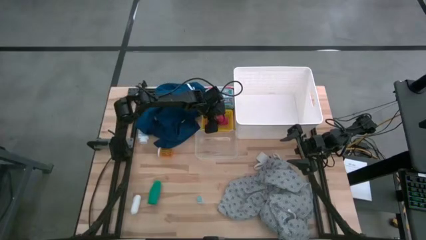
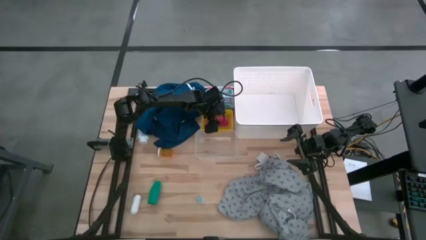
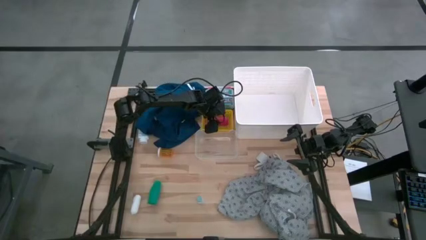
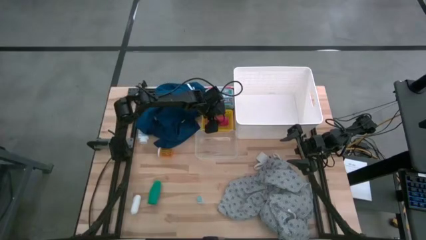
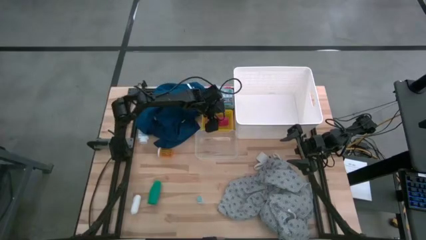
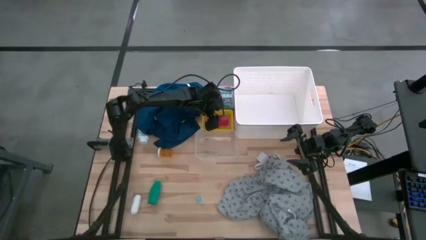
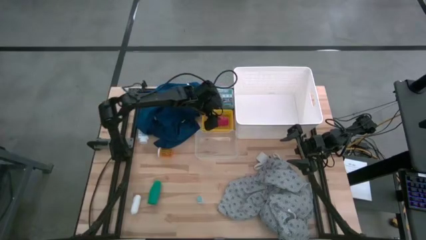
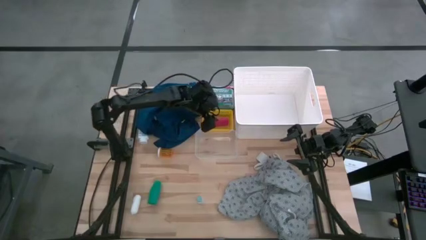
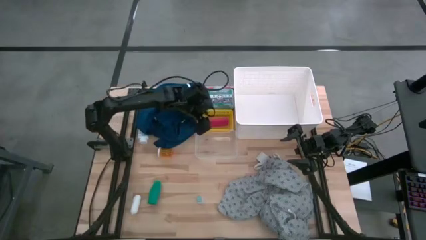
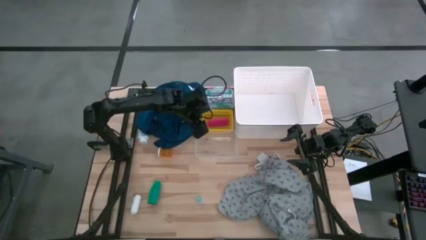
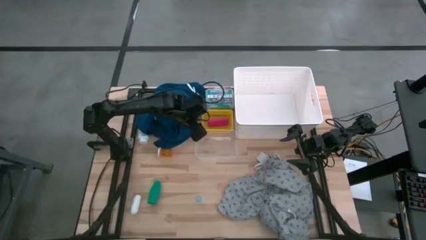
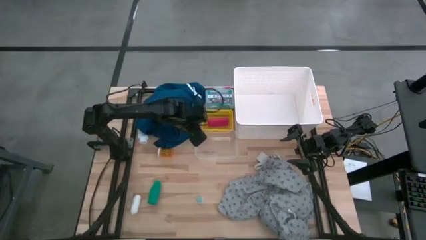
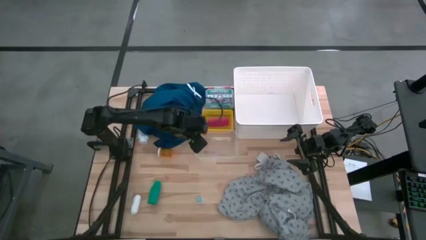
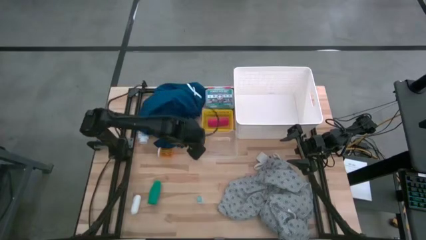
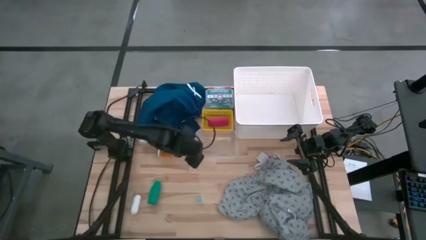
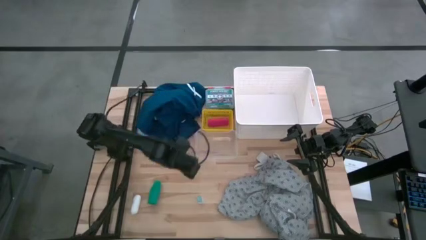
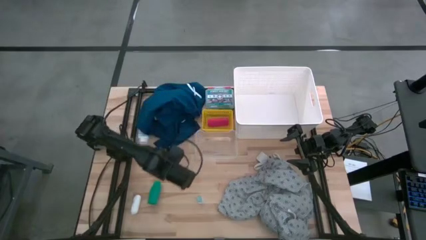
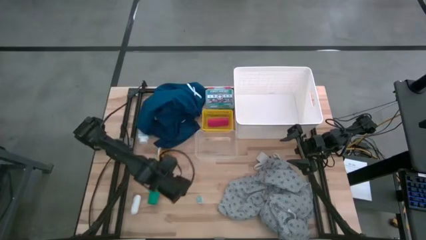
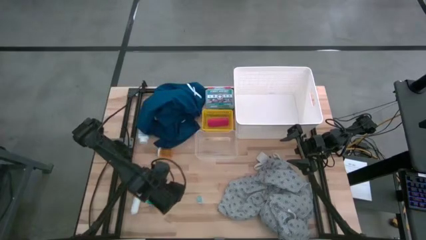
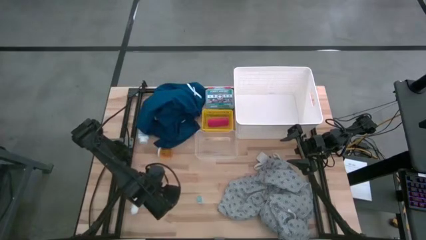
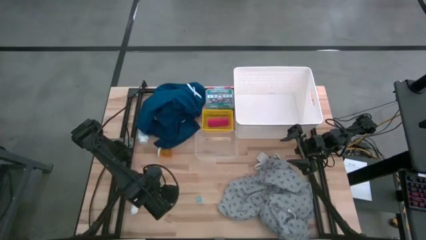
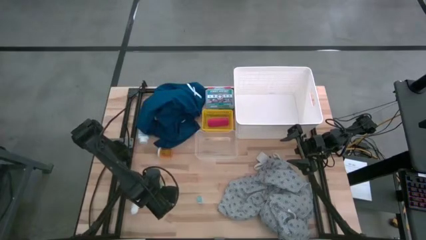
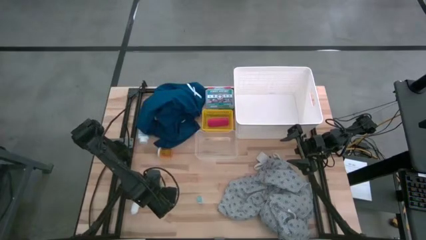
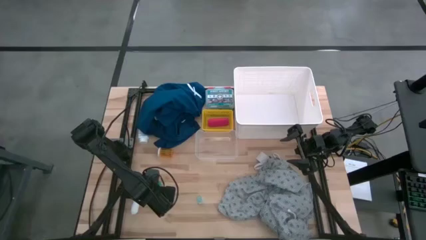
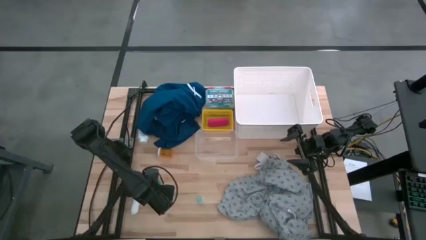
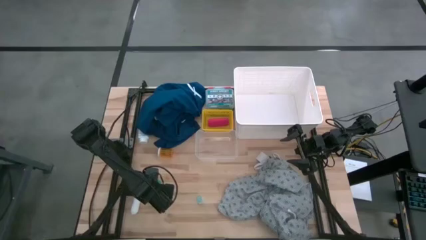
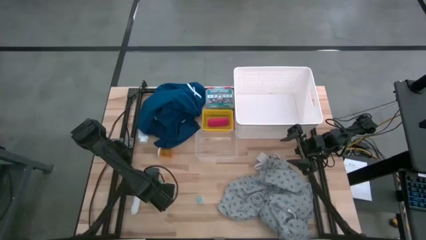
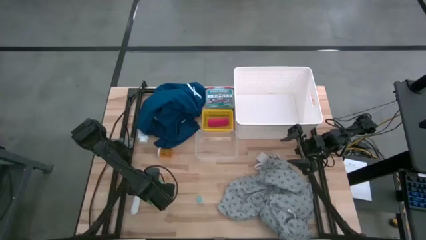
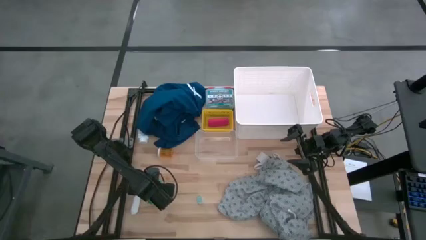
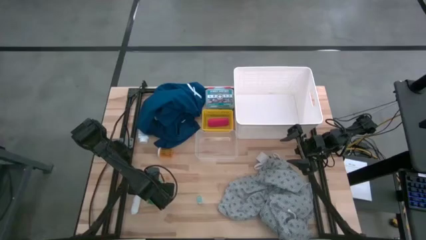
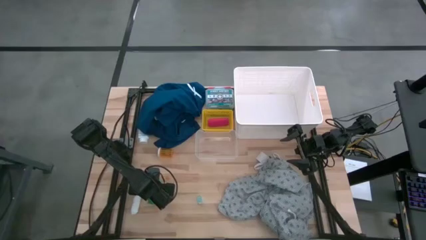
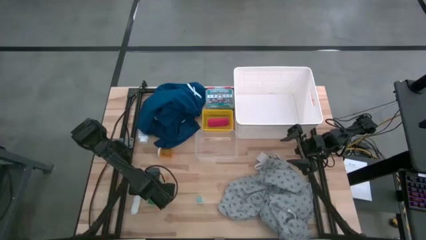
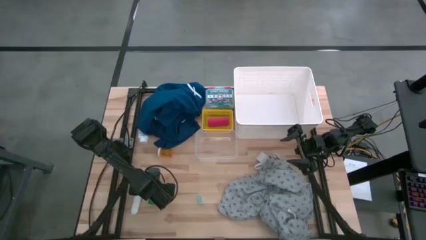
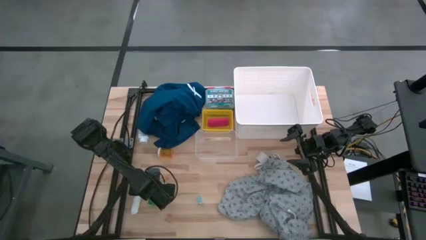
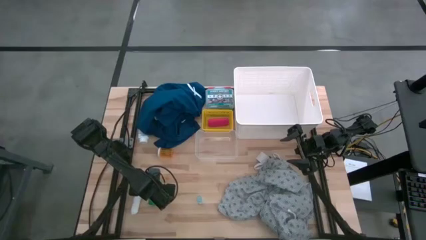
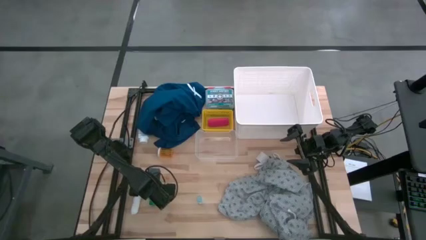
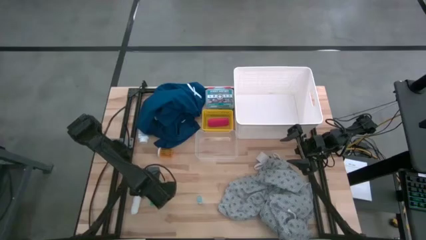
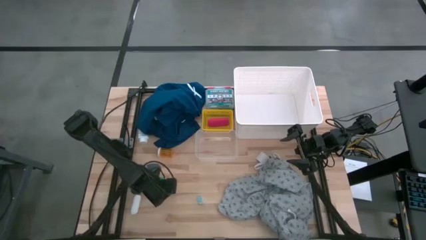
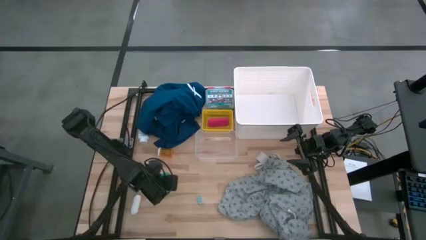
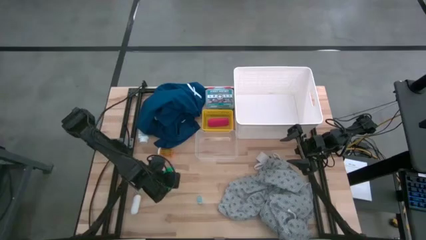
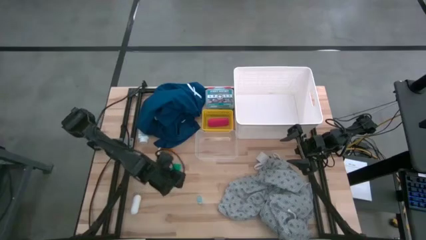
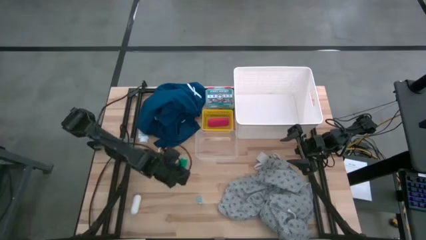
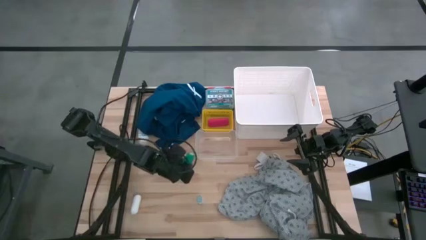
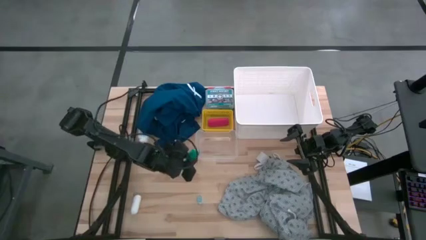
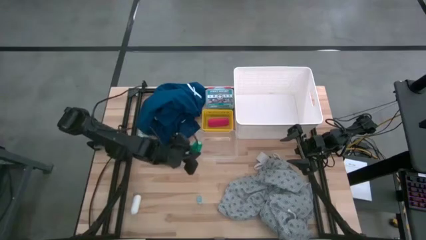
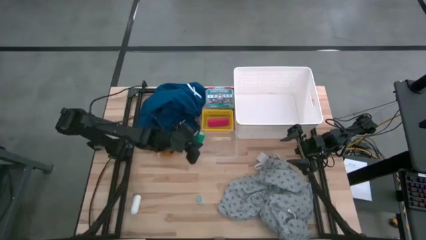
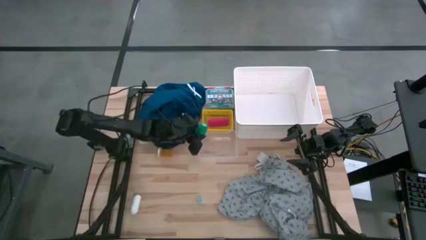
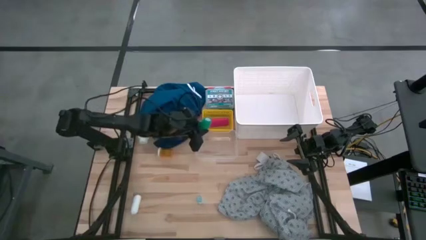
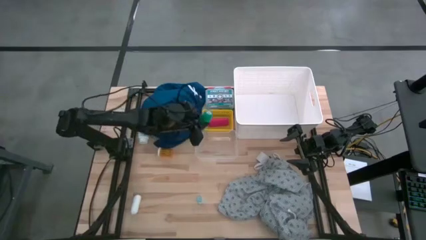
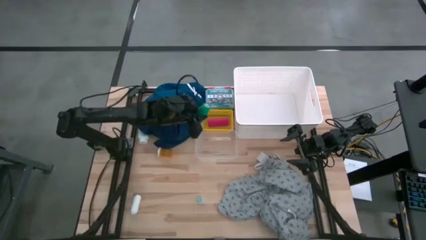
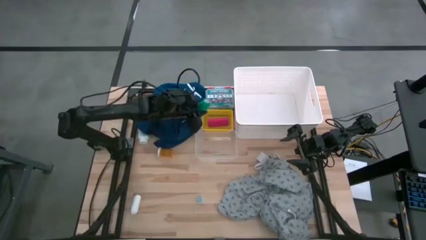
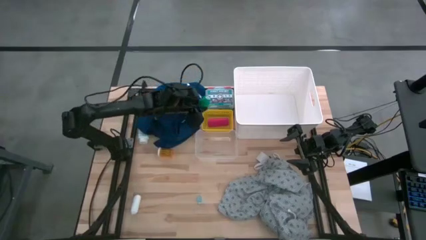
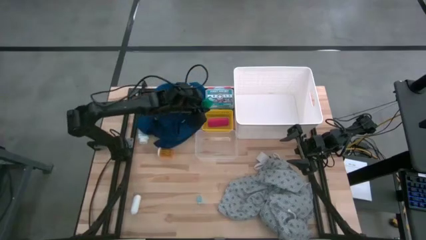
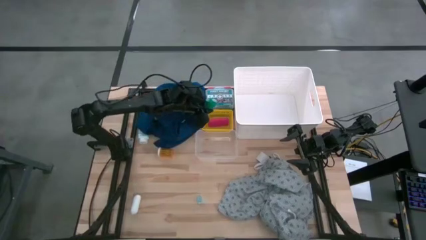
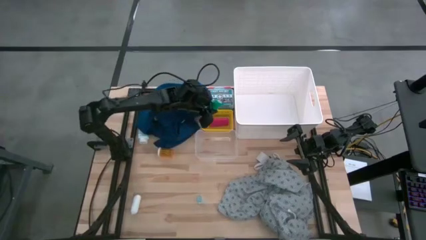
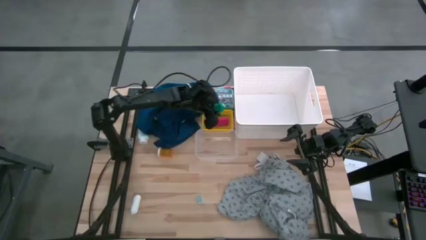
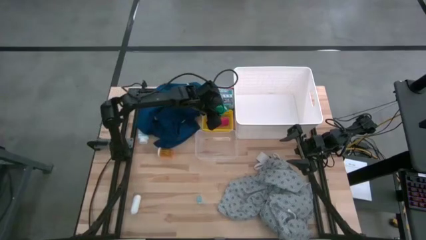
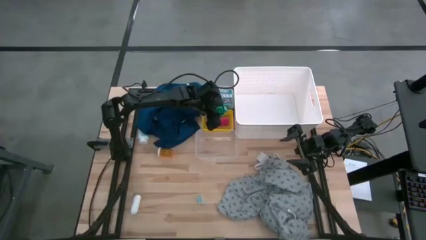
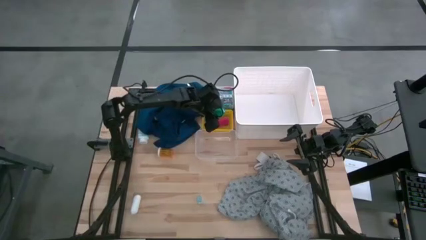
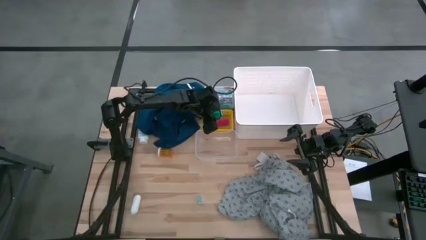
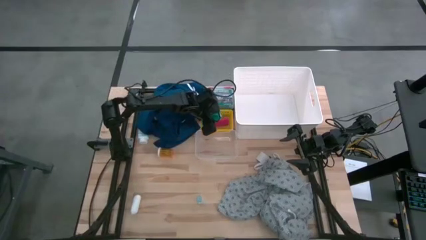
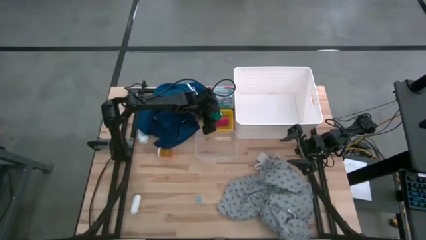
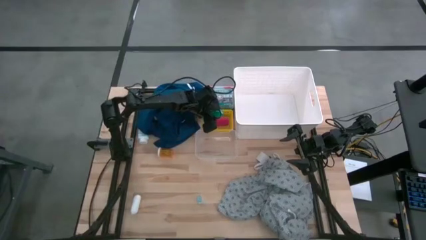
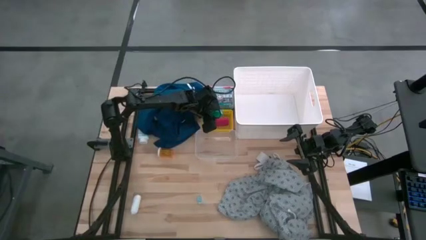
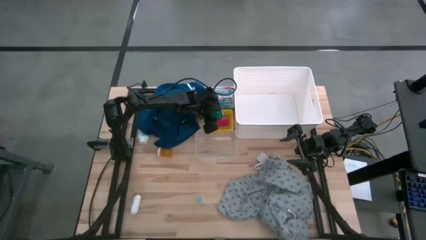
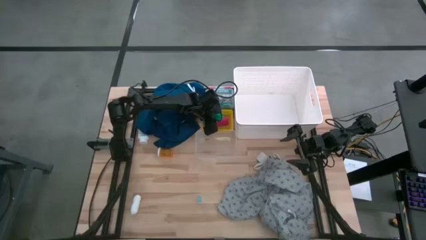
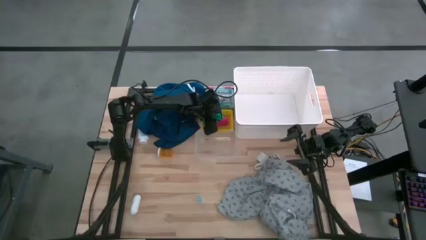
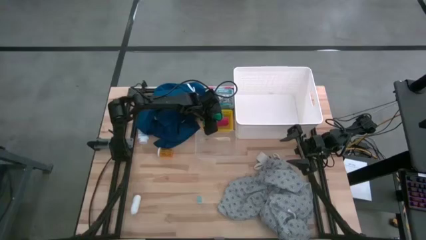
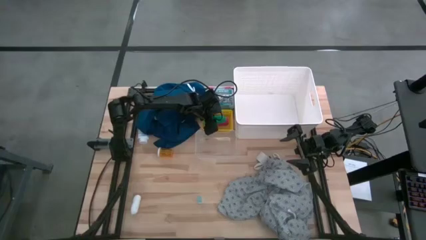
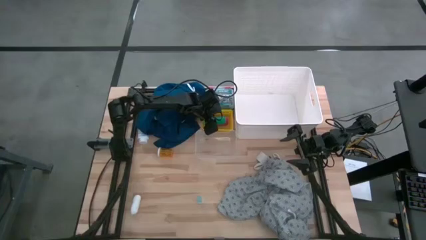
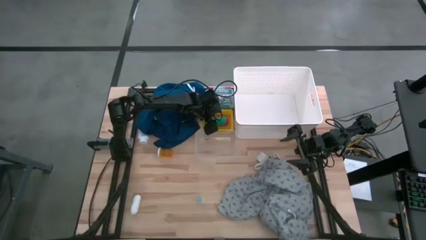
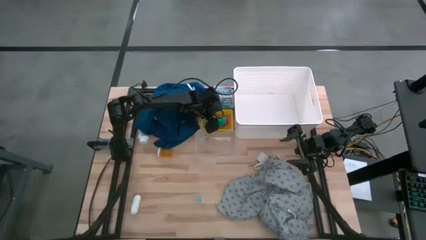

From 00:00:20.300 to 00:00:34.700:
Task: Pick & Place Medicine items
Put the green bandage into the yellow bin
